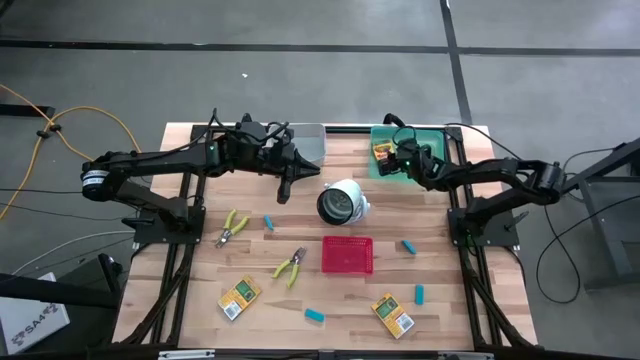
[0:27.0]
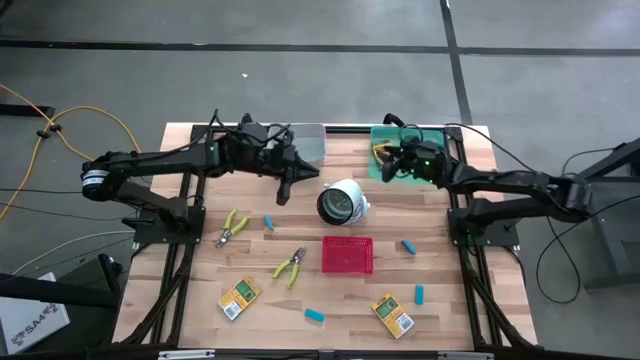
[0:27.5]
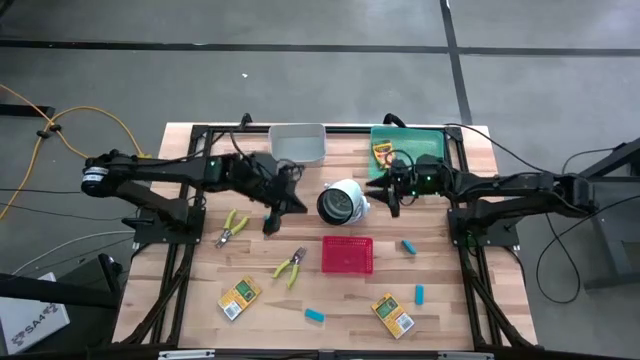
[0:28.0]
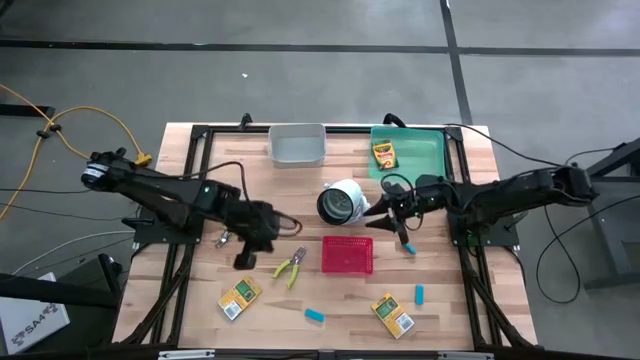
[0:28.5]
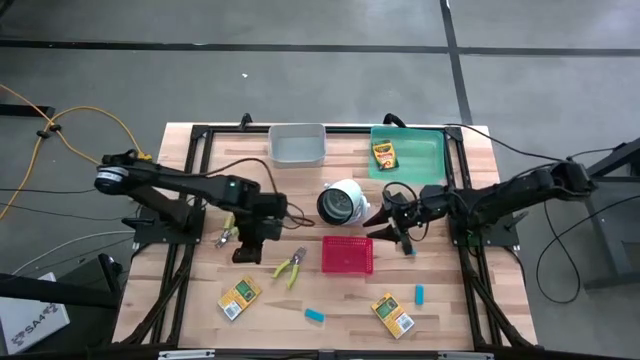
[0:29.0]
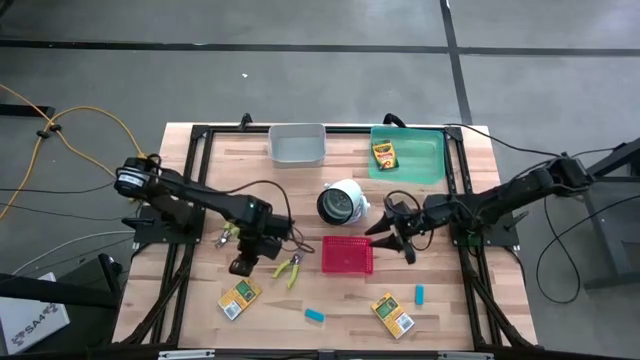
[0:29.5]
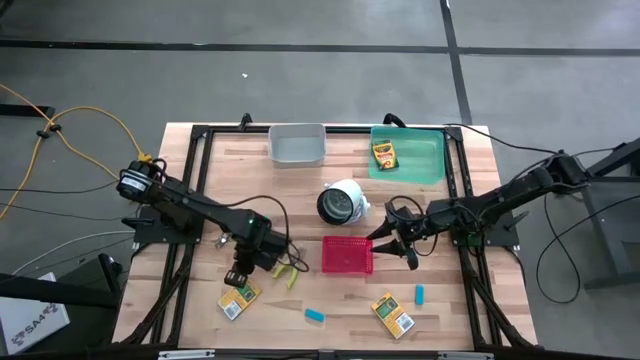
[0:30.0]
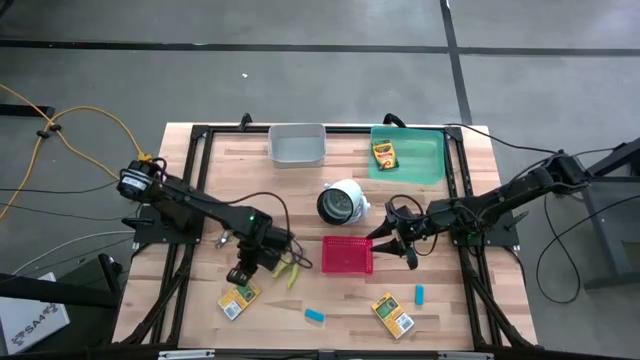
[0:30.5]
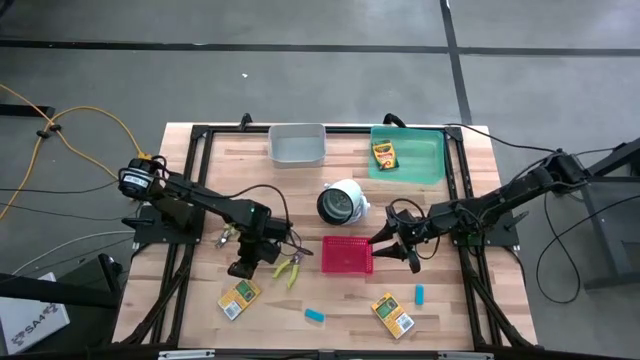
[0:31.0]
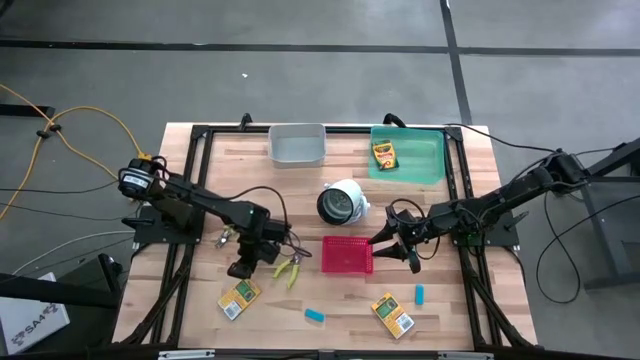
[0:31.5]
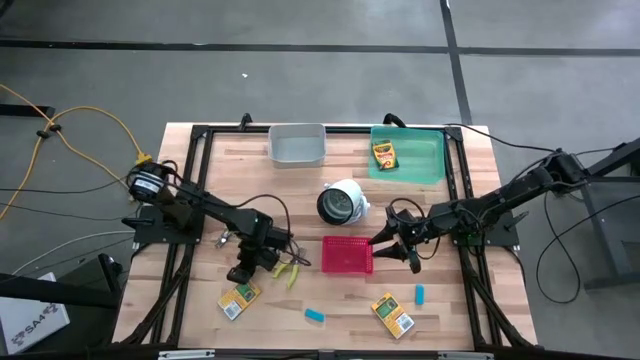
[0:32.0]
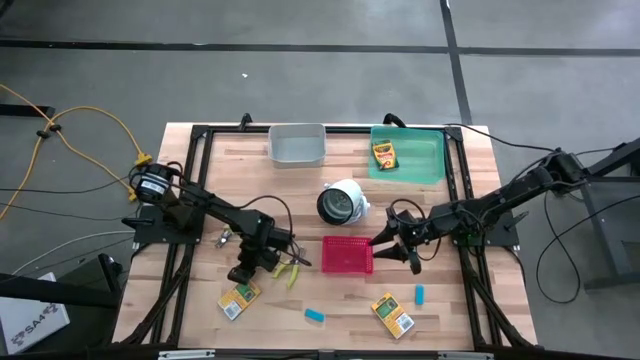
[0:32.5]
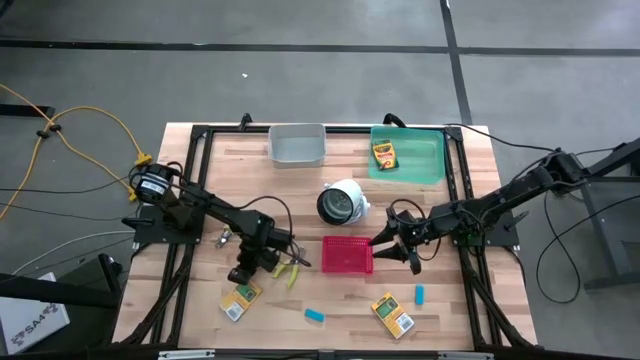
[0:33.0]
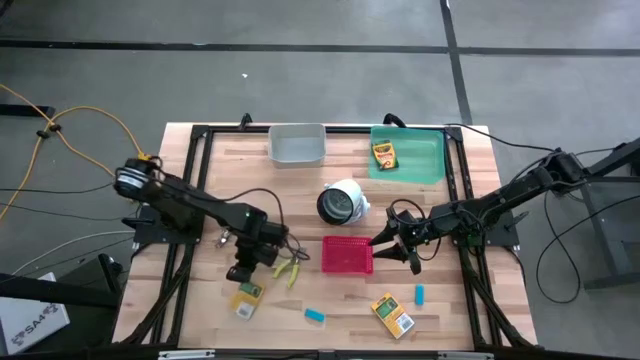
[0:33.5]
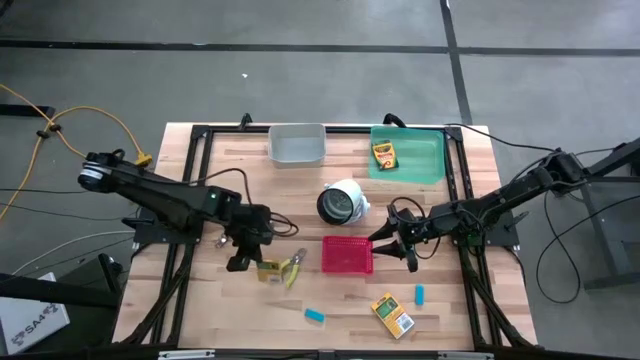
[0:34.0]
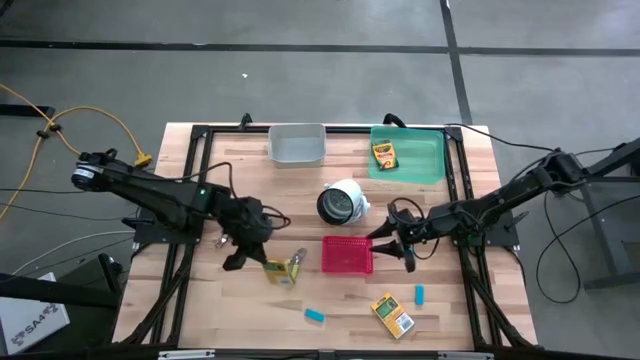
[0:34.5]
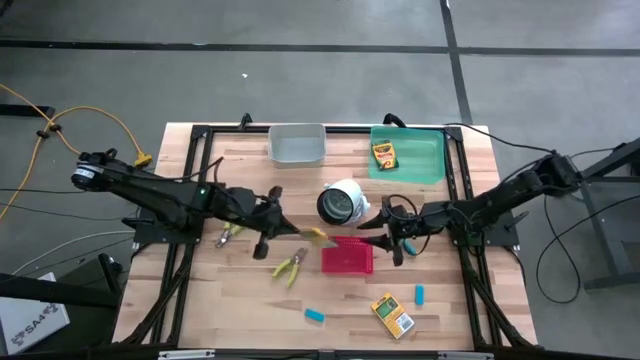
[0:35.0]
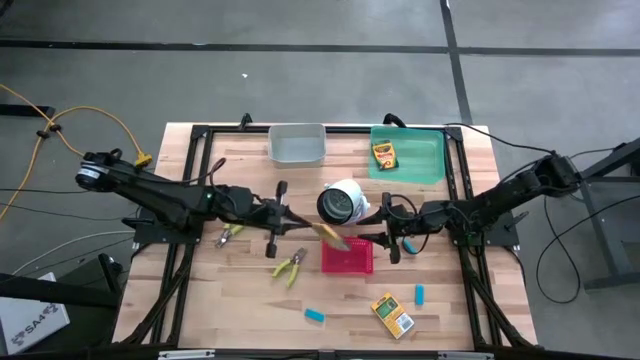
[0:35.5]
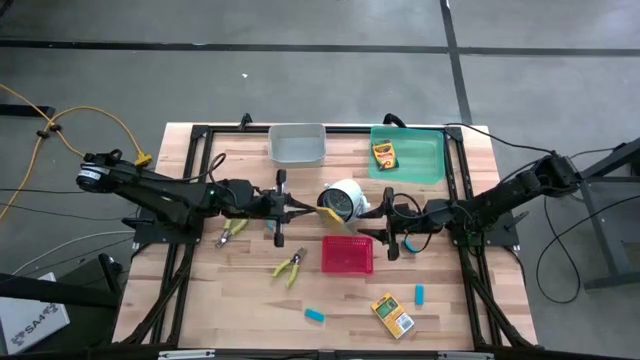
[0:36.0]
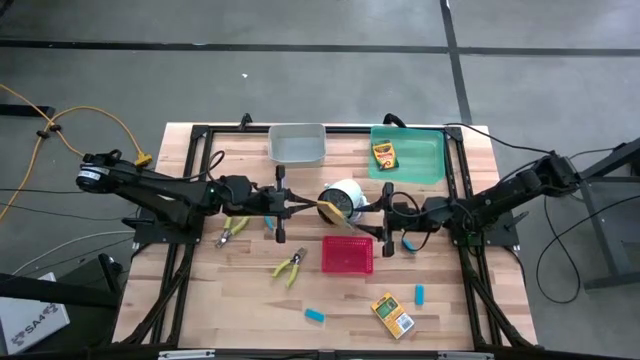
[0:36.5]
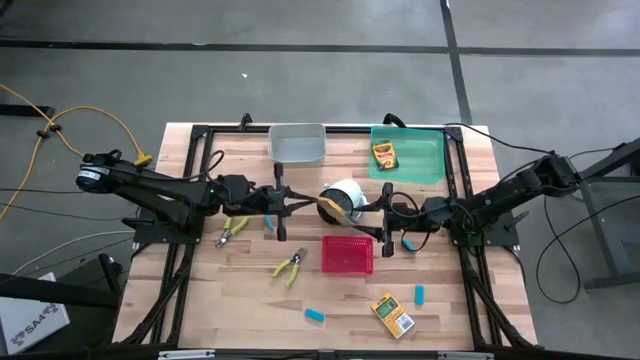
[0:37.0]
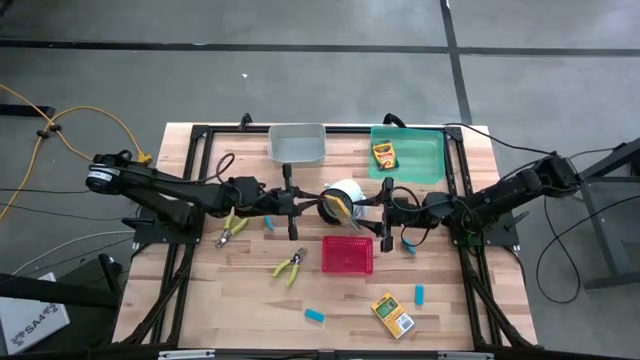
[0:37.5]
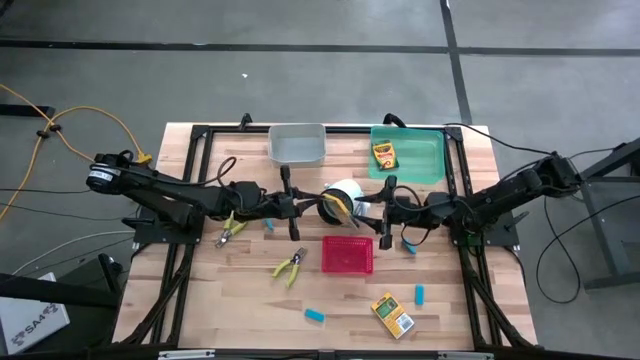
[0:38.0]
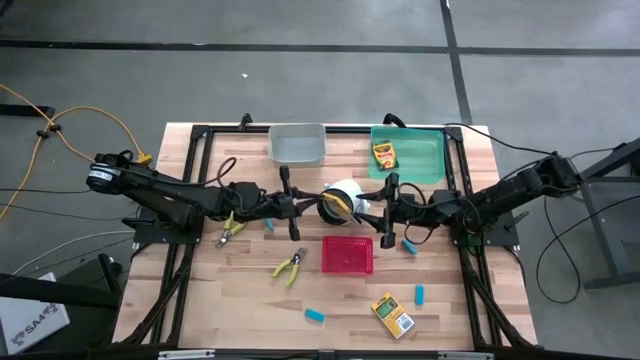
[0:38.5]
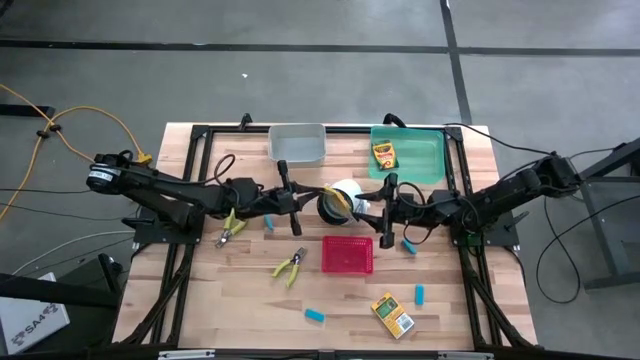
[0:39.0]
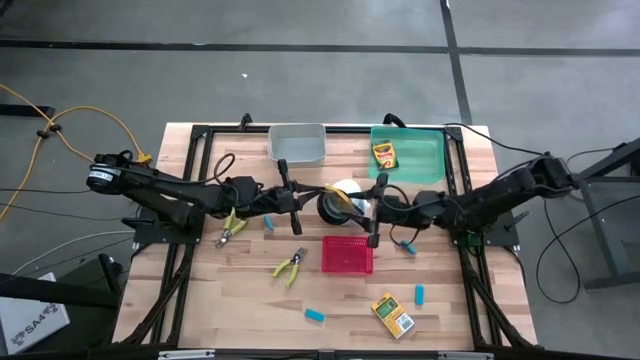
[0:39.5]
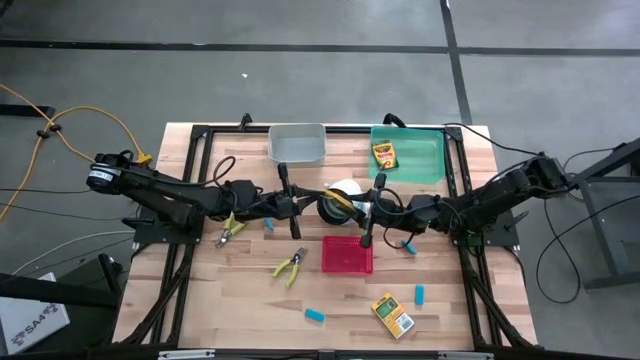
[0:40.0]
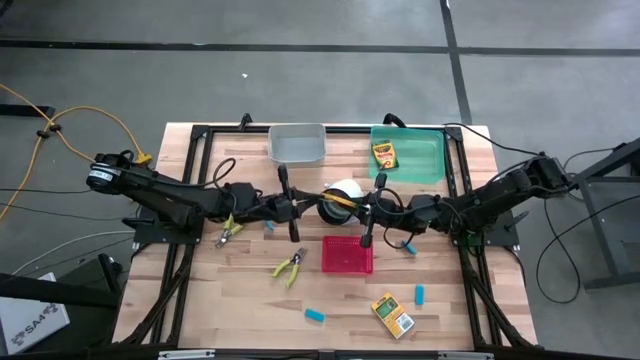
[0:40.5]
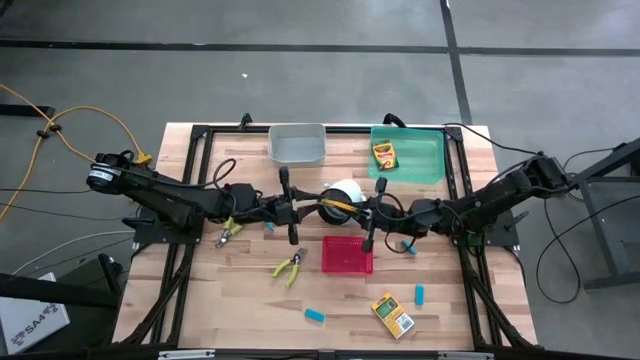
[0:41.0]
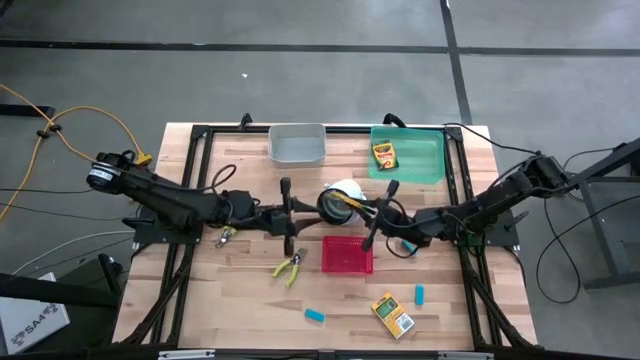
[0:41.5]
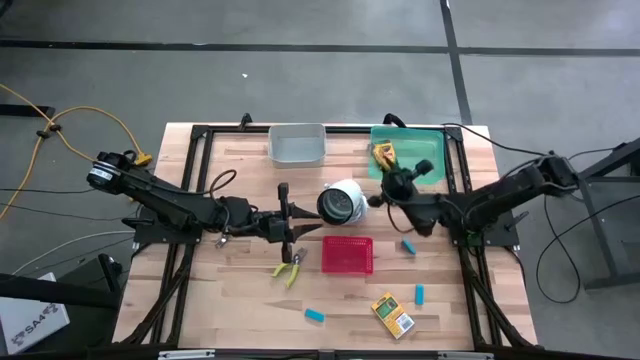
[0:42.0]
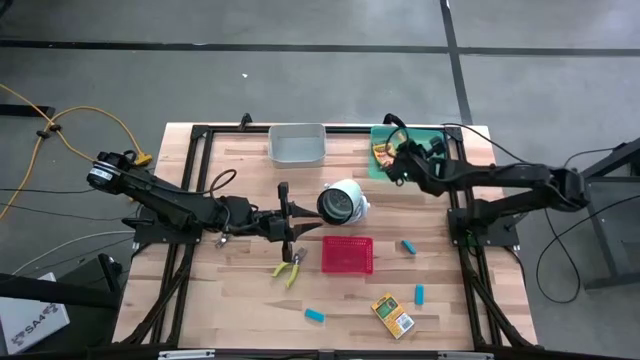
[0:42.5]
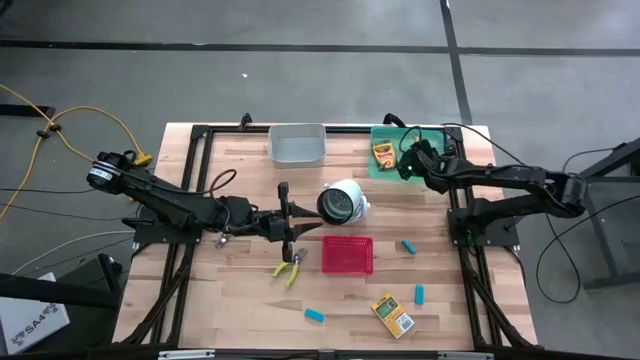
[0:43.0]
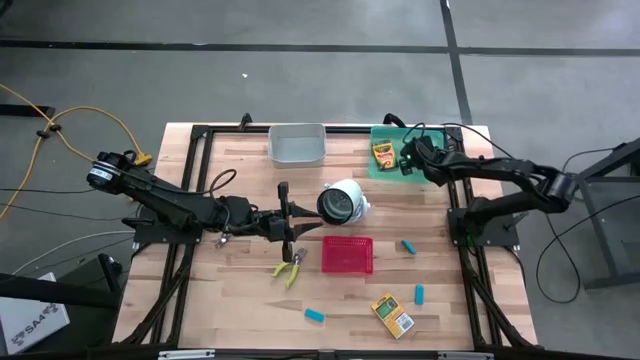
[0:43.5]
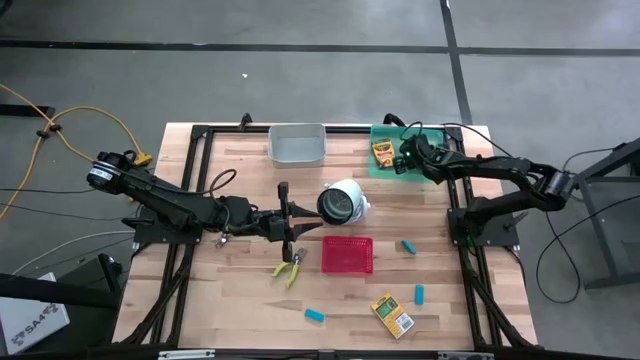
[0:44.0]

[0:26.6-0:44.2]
Task: Pick & Place School Supplies
Put the yellow crayon box into the green bin
